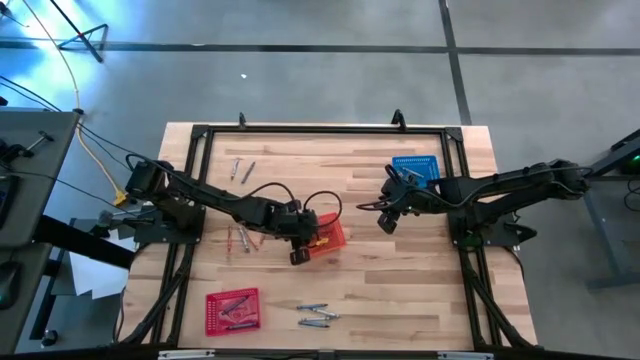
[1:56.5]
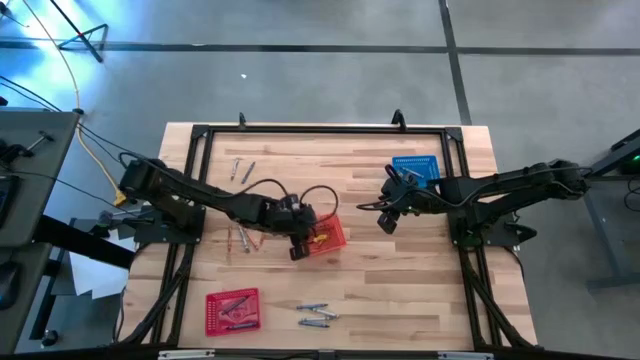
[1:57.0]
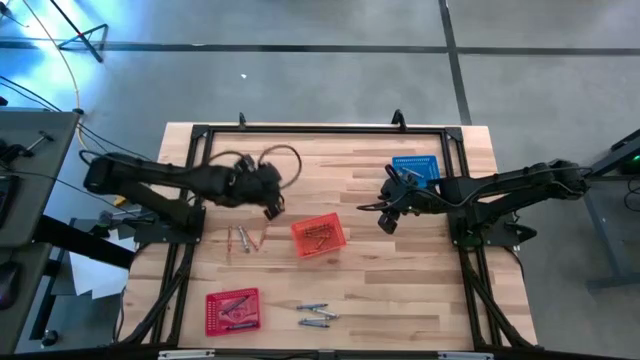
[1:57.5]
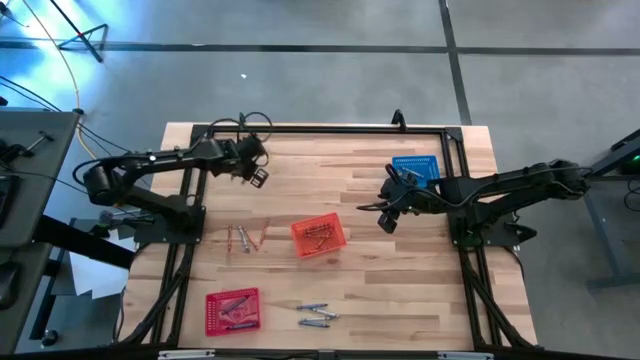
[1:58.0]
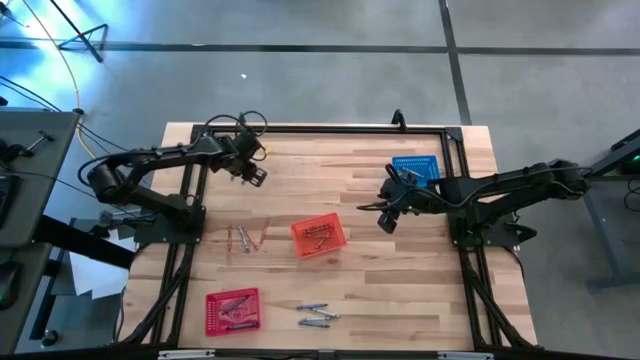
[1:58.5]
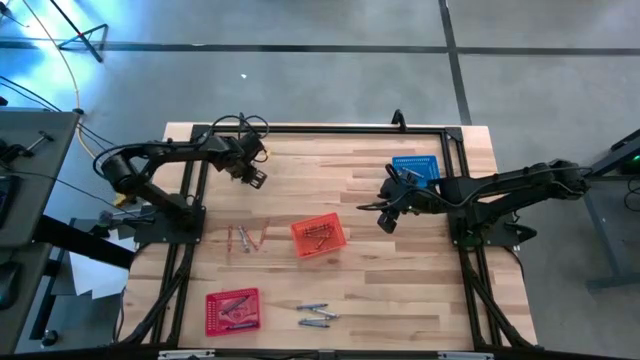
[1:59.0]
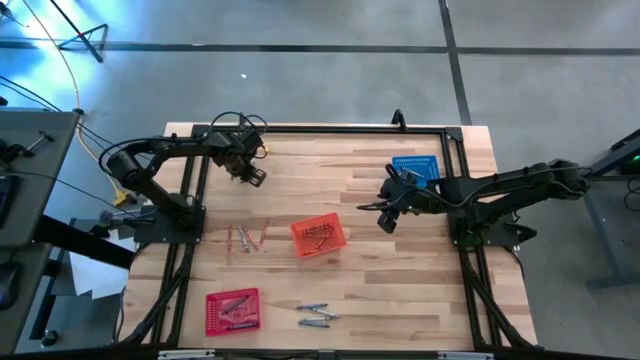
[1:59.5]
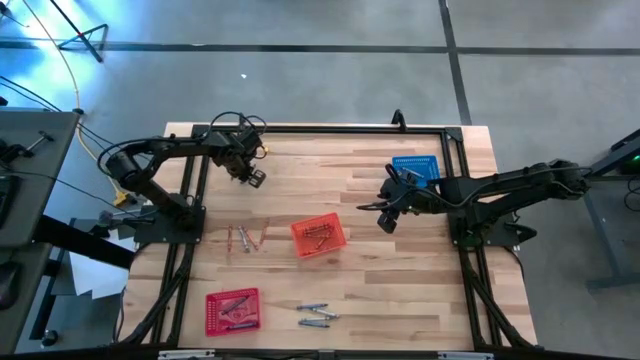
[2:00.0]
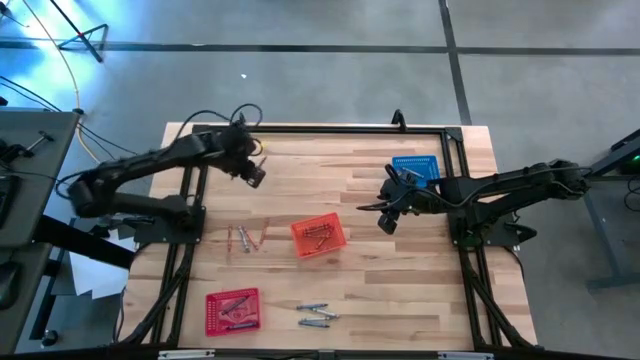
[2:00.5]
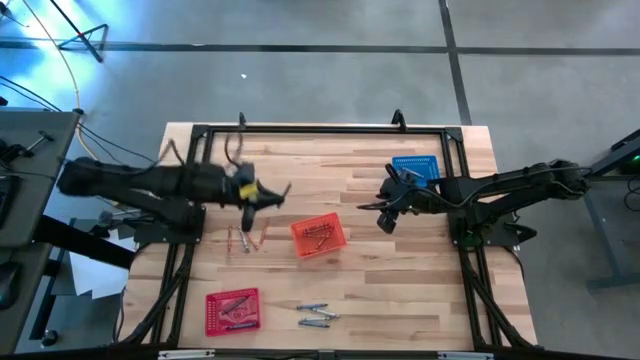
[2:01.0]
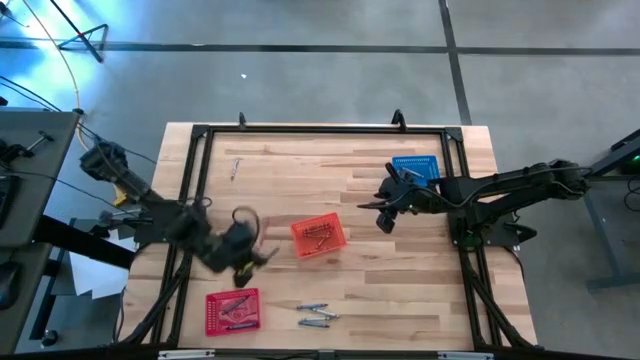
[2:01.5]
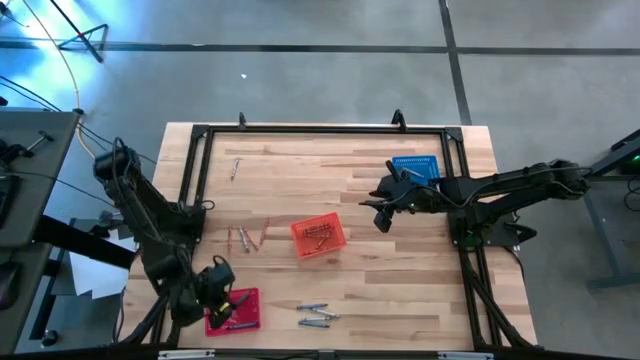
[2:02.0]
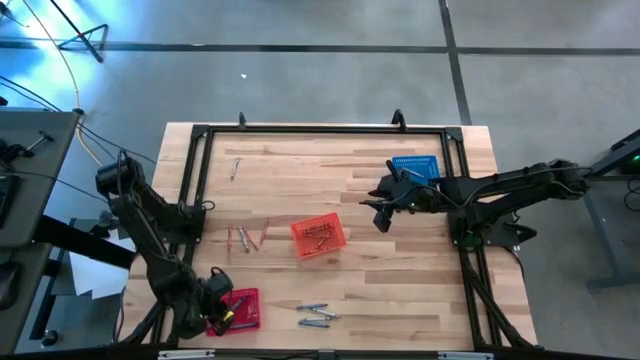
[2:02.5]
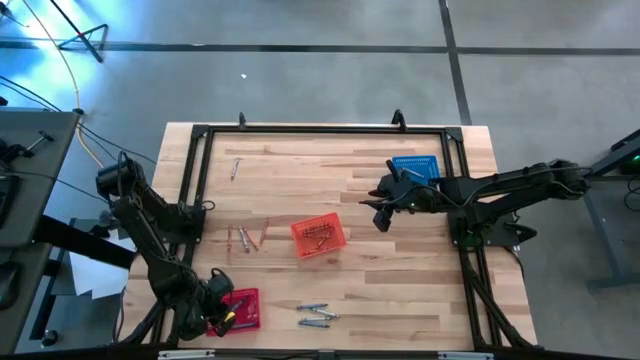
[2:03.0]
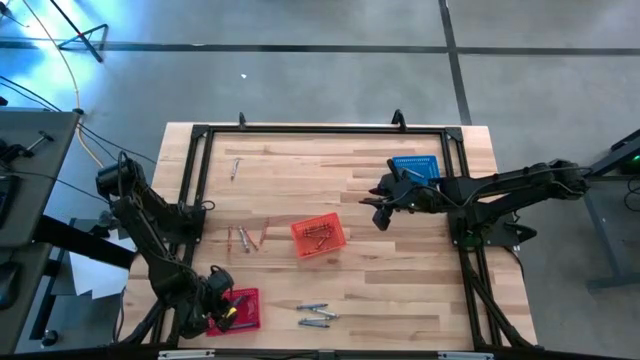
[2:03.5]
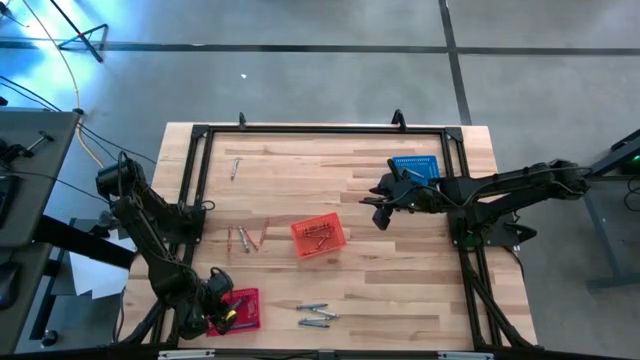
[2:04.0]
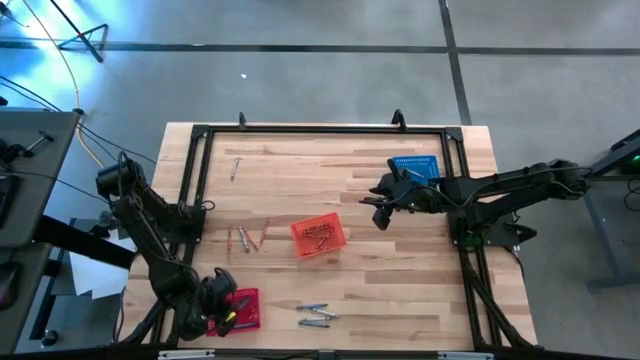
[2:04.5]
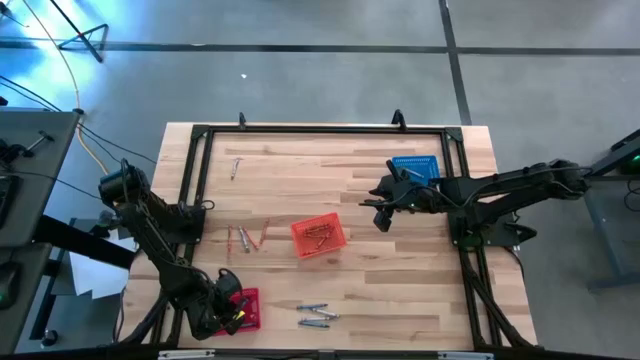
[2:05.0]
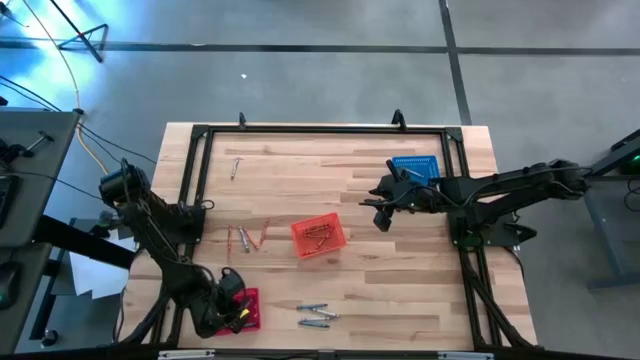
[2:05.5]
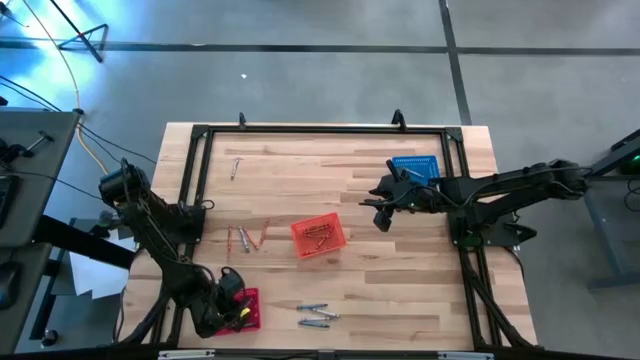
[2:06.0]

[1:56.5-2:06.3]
Task: Sort crayons
Put the blue crayon into the red bin

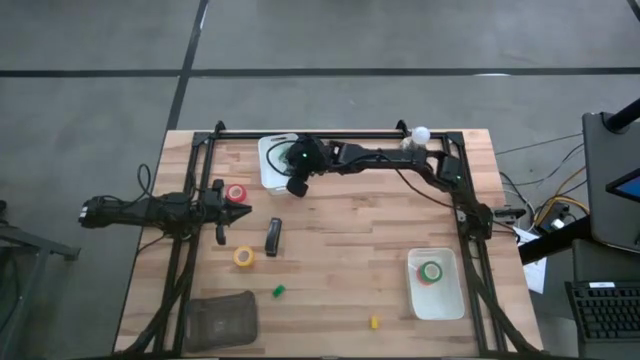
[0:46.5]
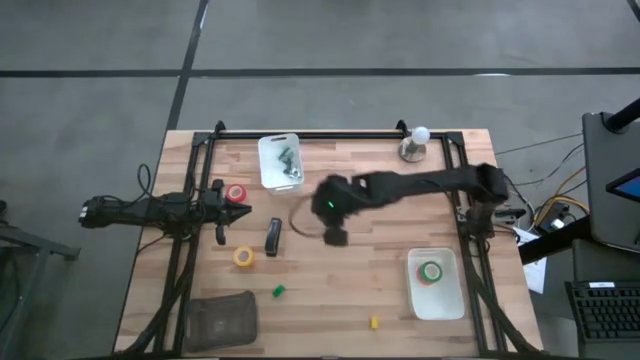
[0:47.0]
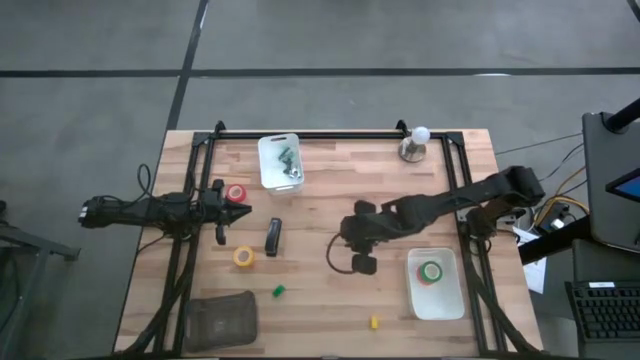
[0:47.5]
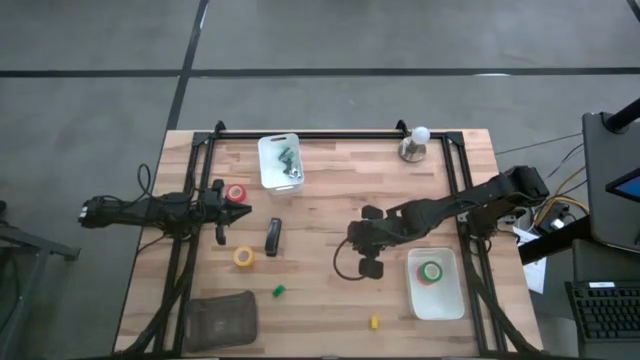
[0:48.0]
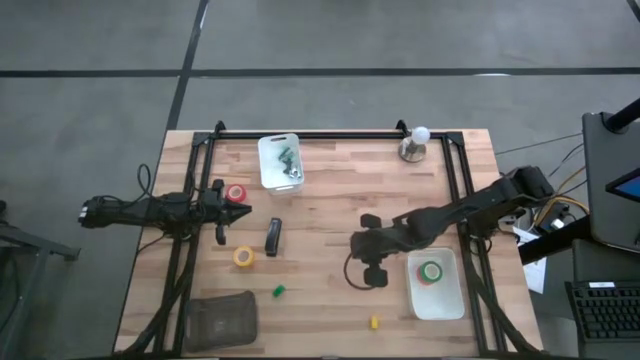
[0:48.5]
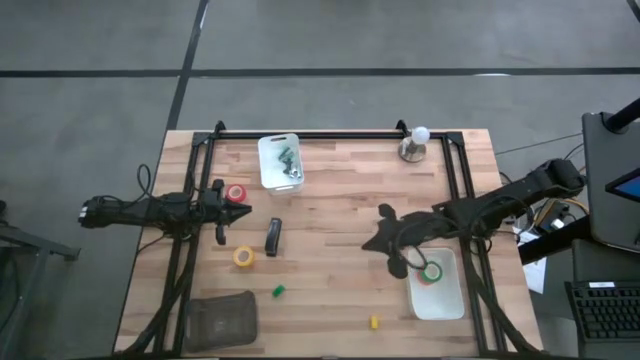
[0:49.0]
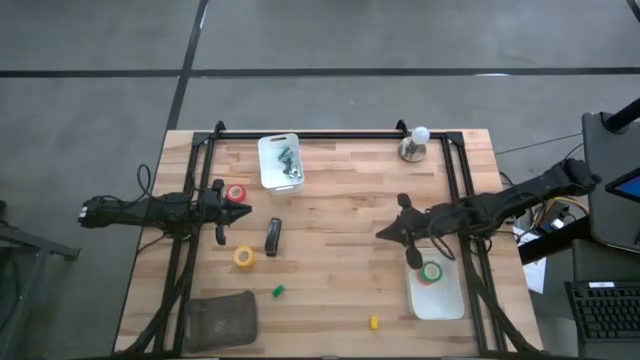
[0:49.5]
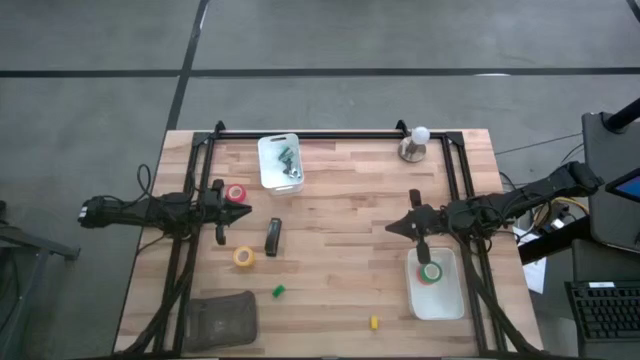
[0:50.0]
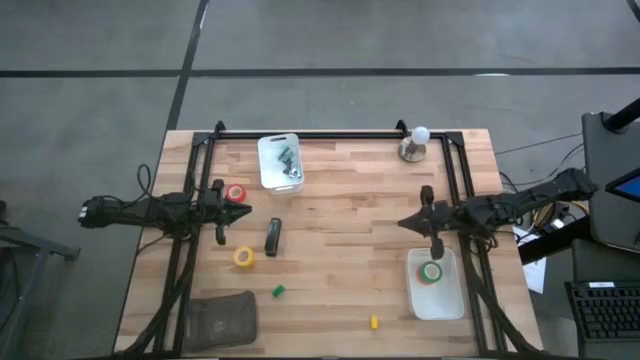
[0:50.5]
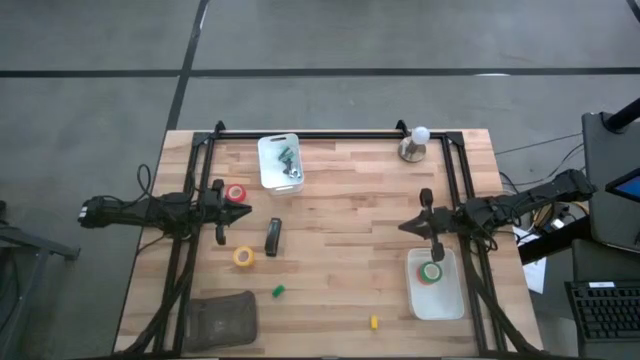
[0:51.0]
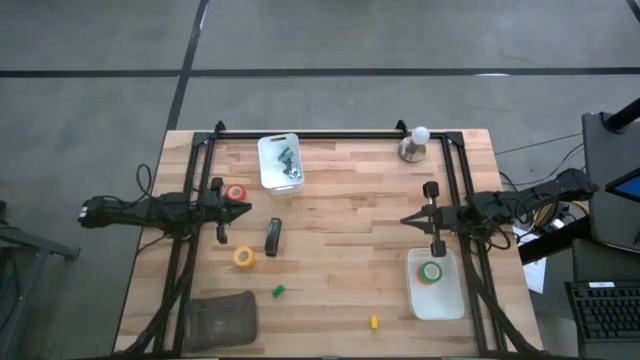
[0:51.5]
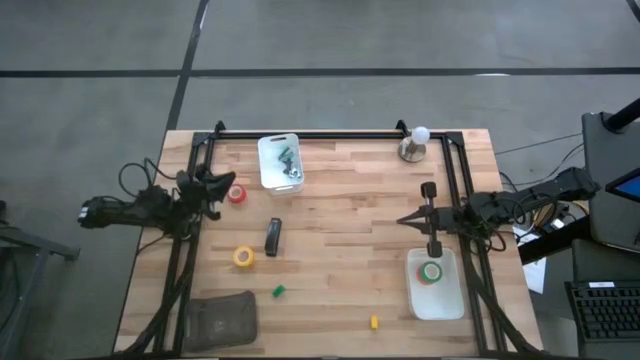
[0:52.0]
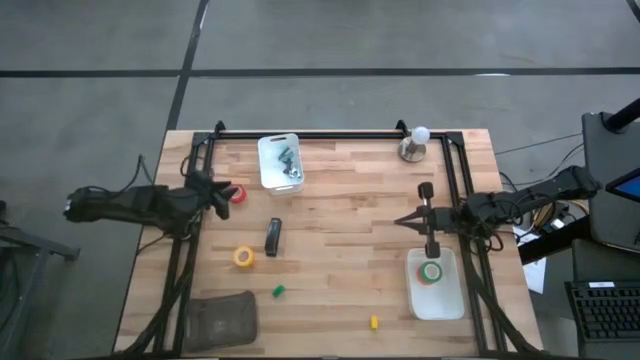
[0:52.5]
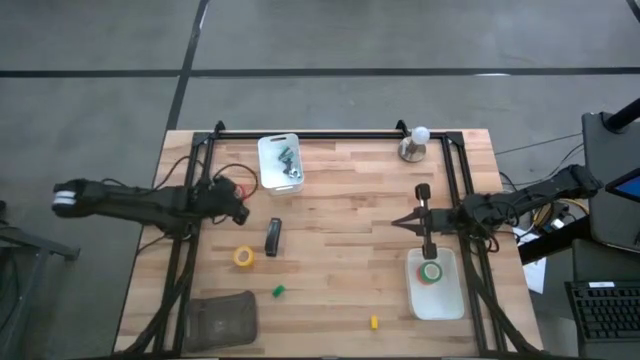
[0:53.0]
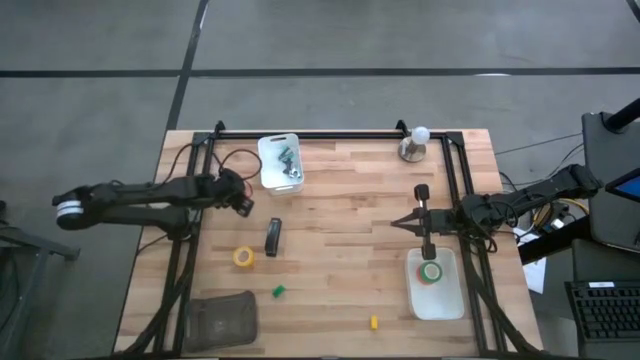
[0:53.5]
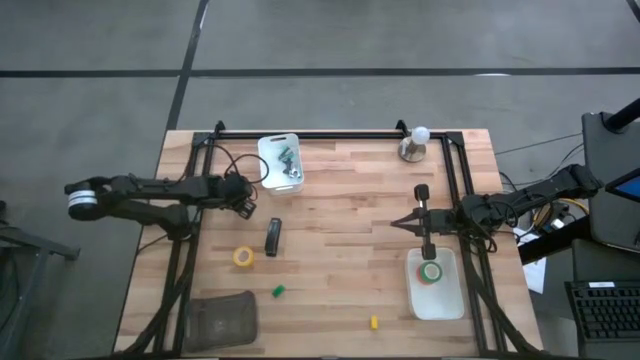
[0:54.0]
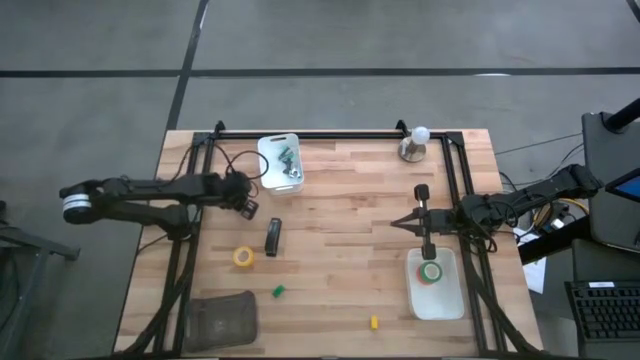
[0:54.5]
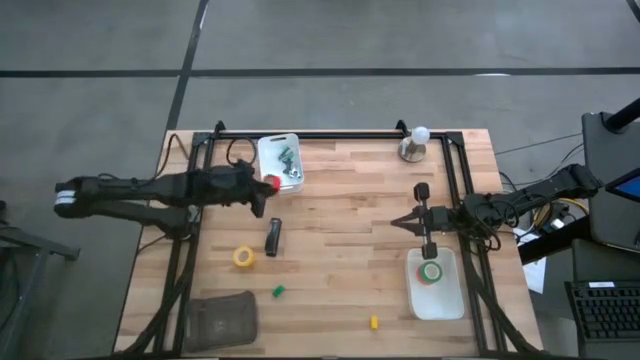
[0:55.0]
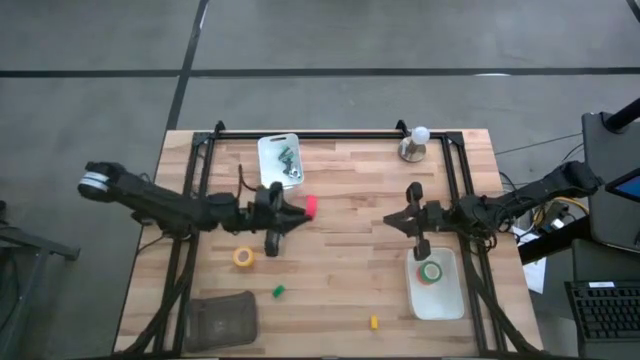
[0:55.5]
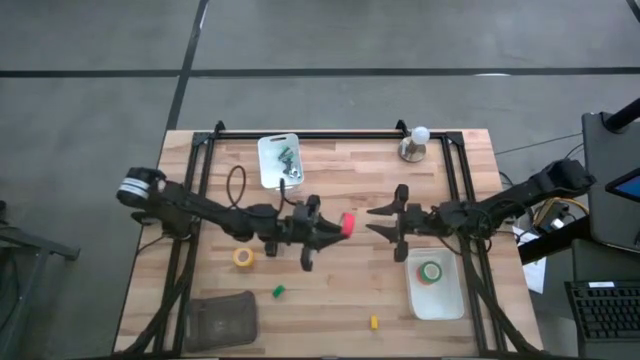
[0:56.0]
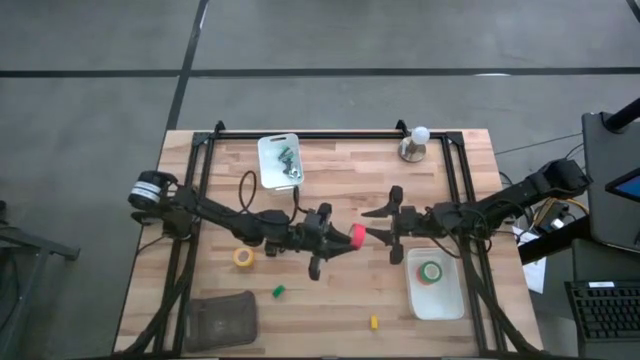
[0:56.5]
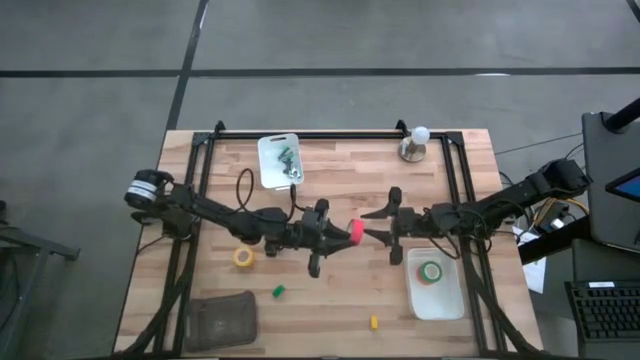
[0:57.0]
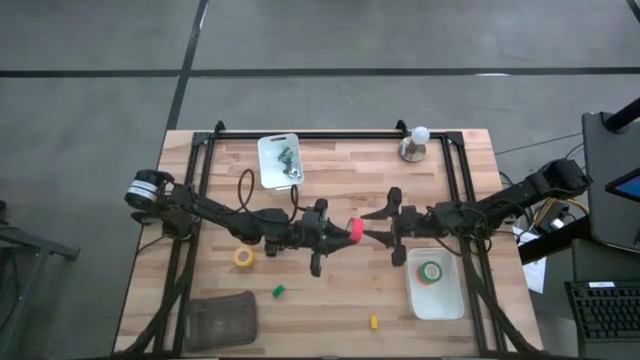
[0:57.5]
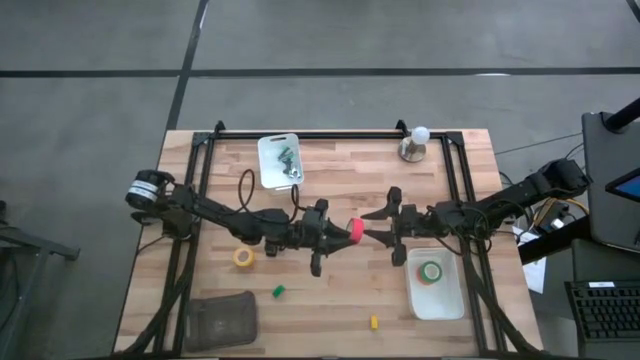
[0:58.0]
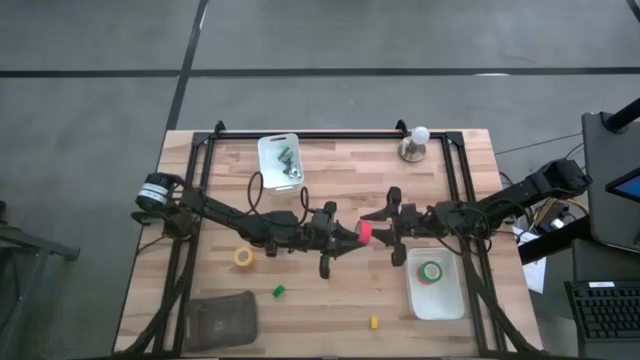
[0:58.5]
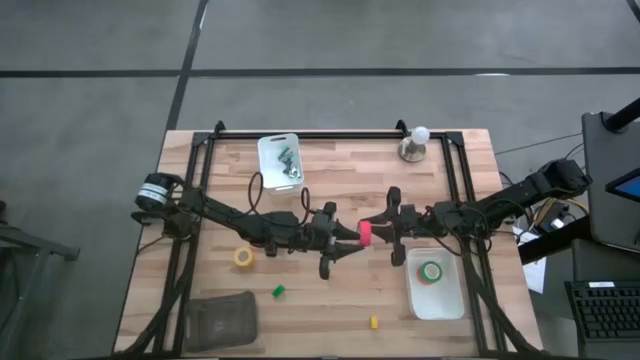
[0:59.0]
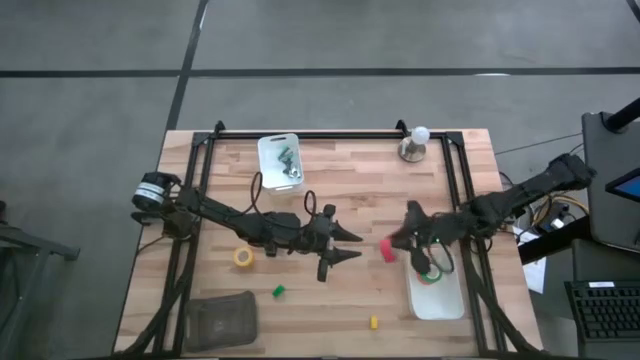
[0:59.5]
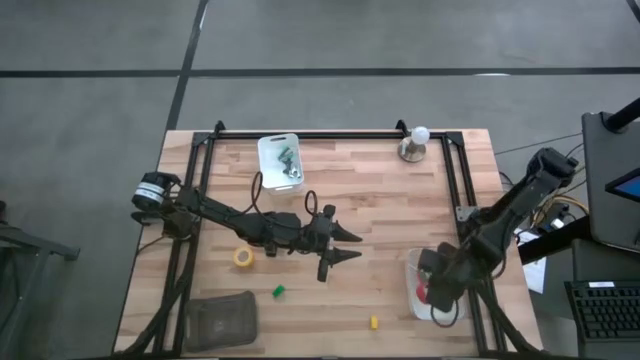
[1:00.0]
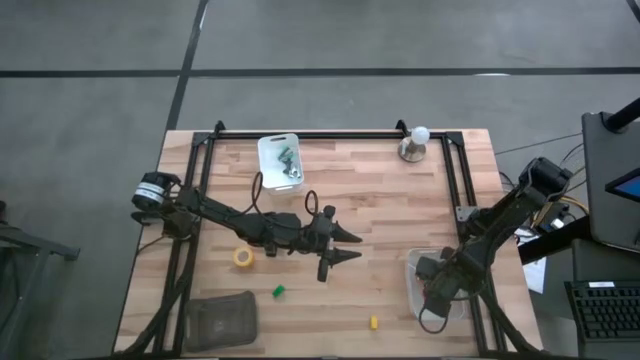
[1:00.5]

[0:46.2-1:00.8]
Task: Pick and place Stapler, Stapler remover, tape
Put the red tape into the bottom white bin
